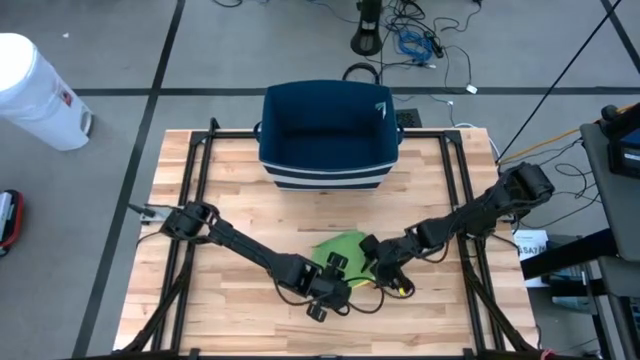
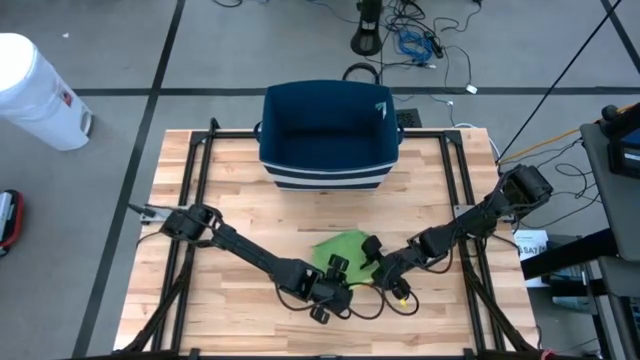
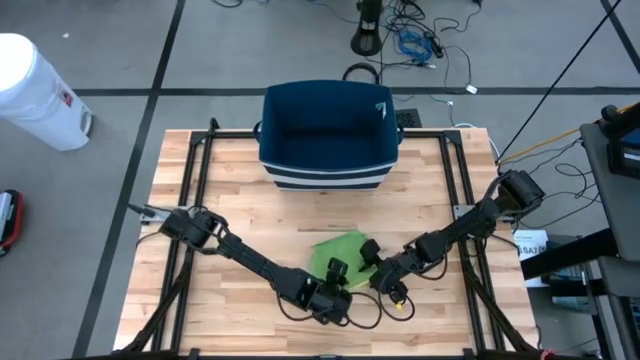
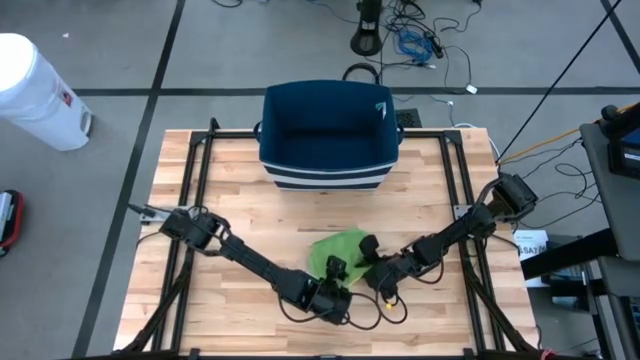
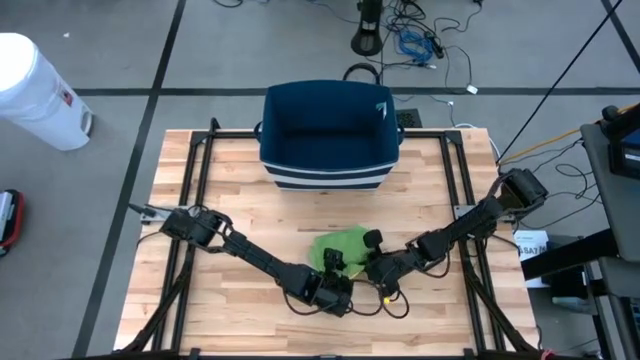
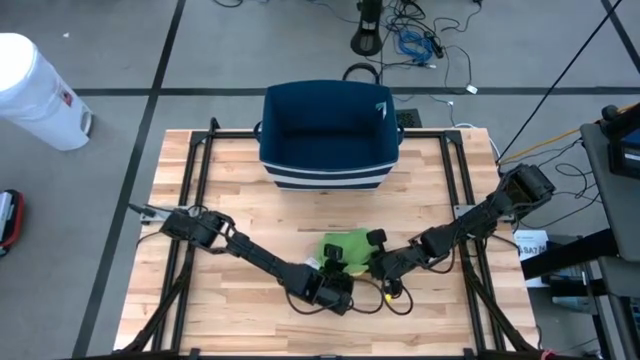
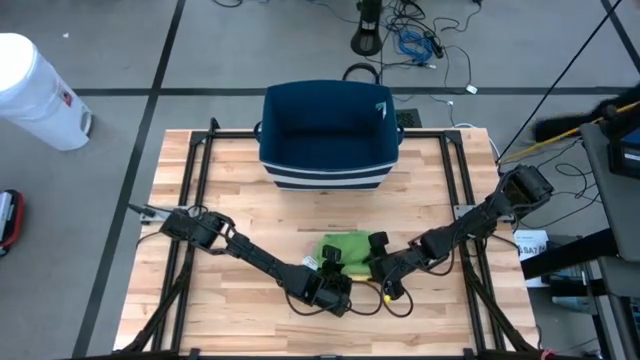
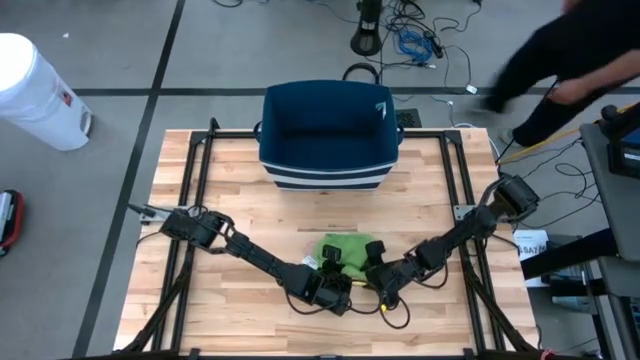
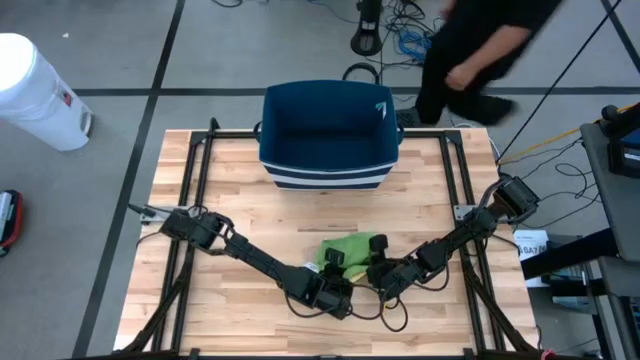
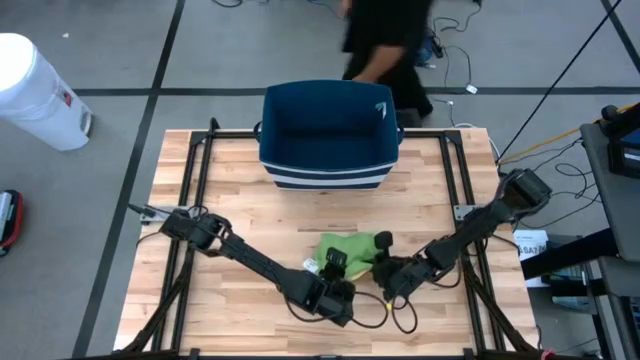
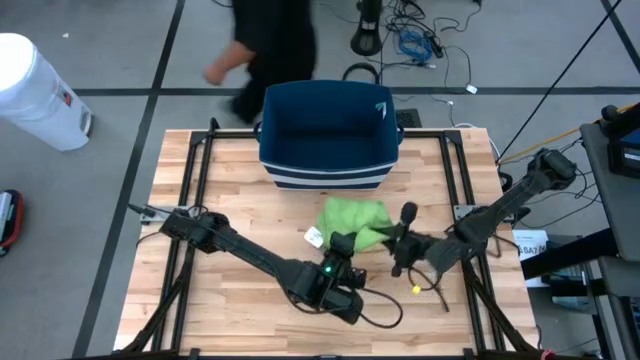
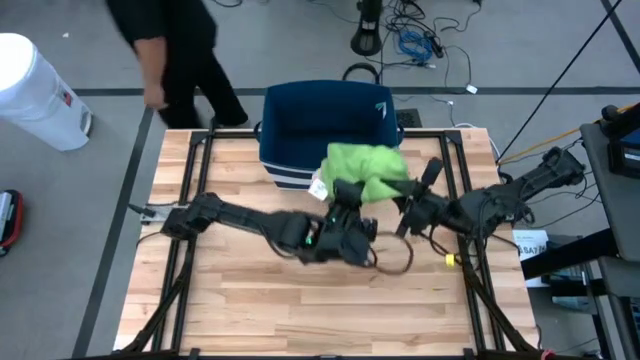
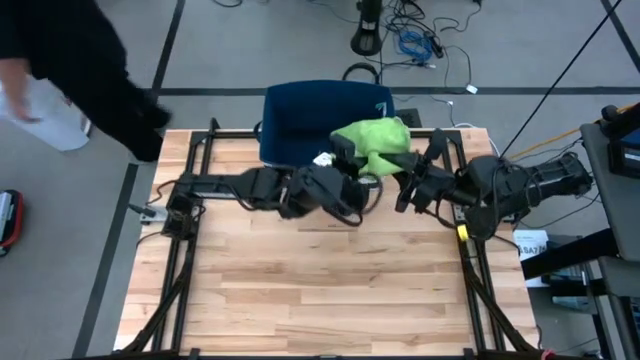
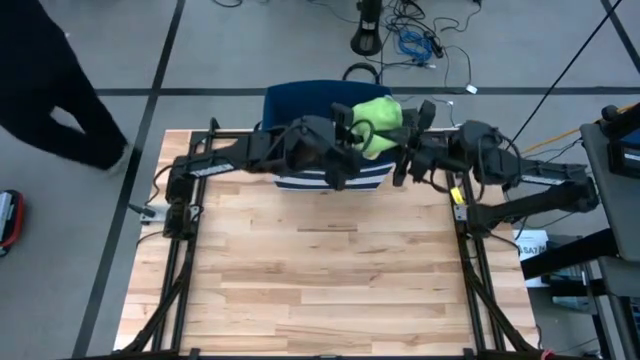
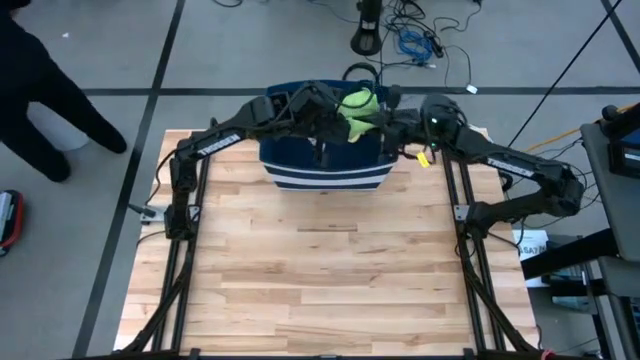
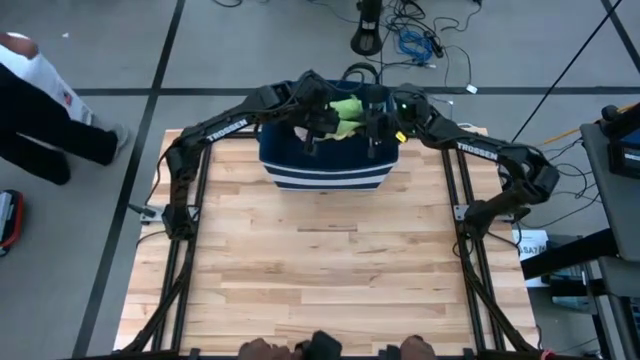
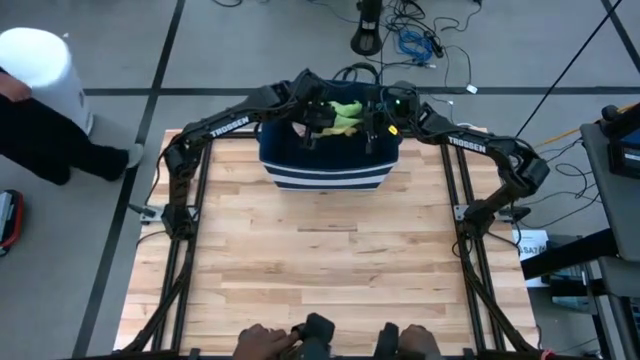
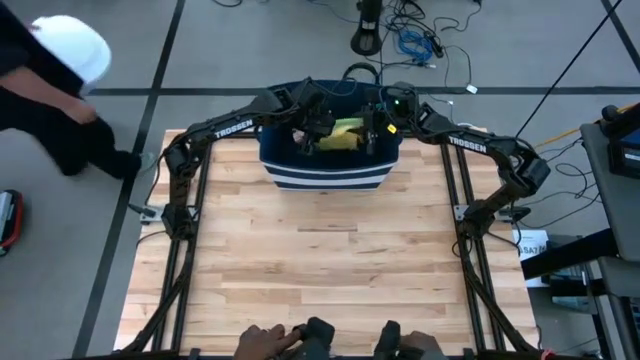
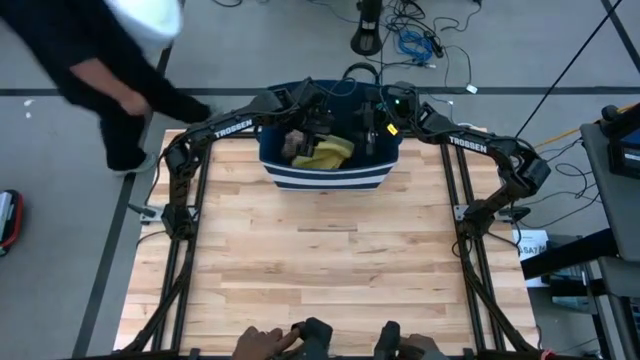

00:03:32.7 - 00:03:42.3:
Task: Fold towel
Put the stacked towels into the blue laundry bin

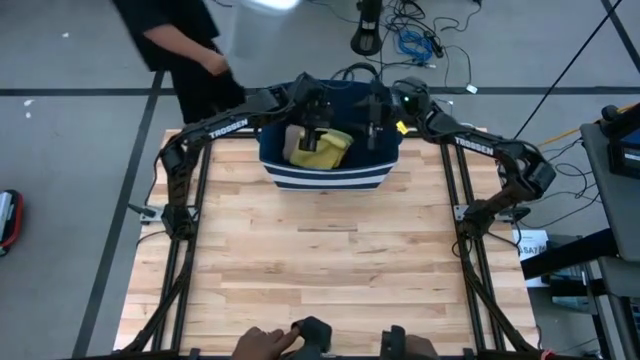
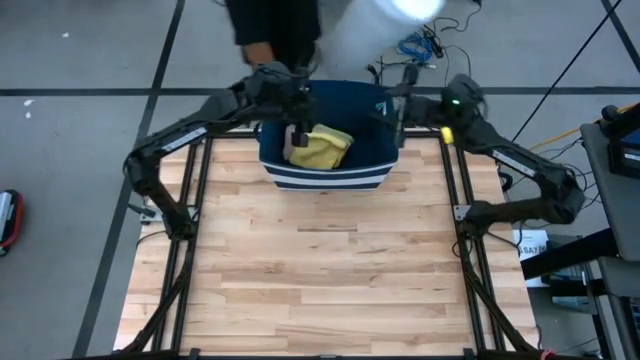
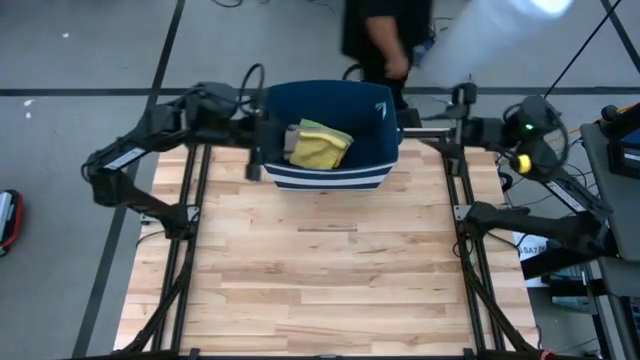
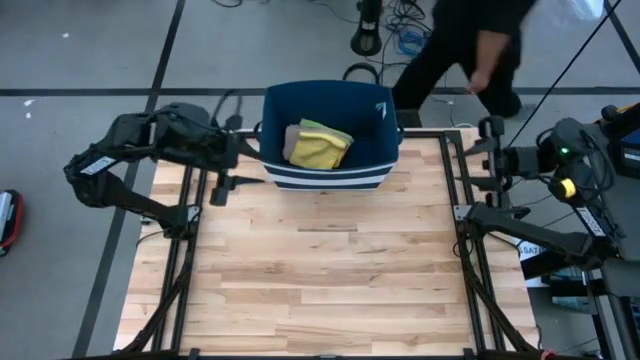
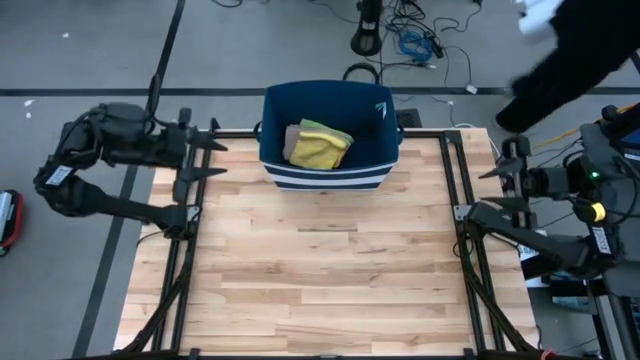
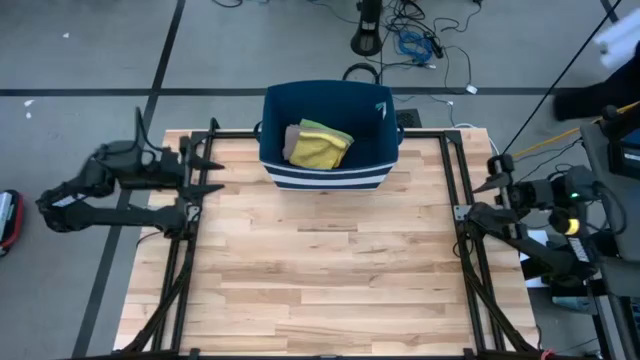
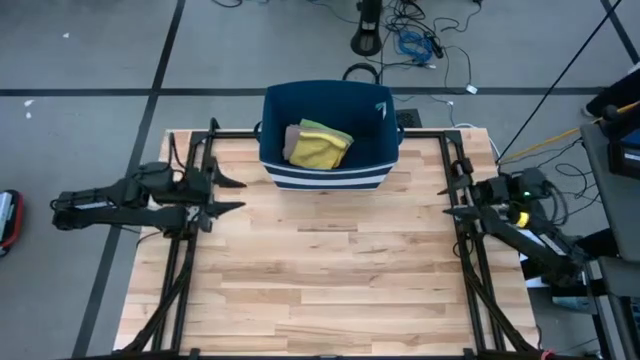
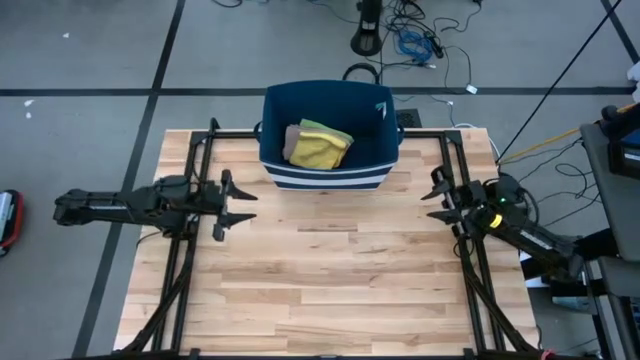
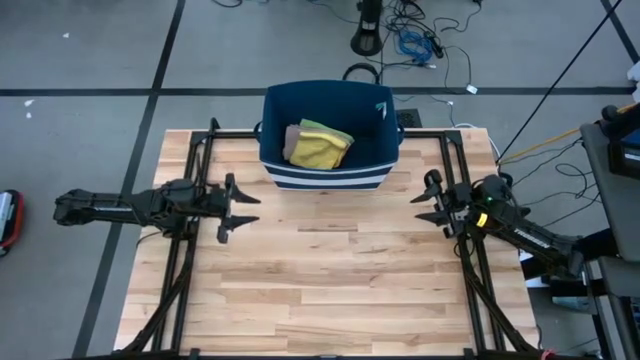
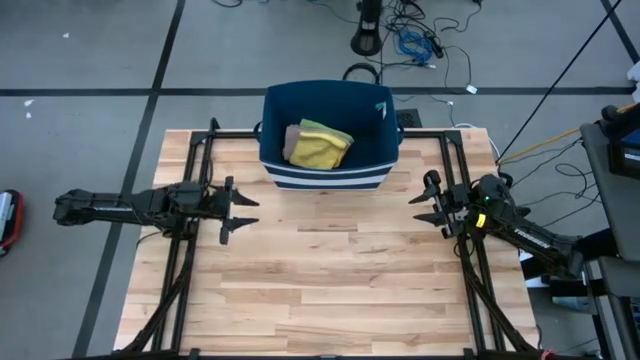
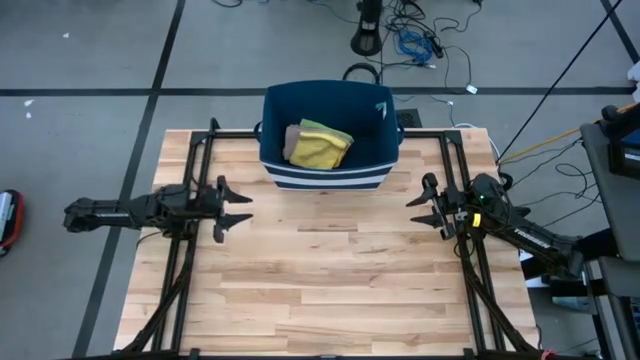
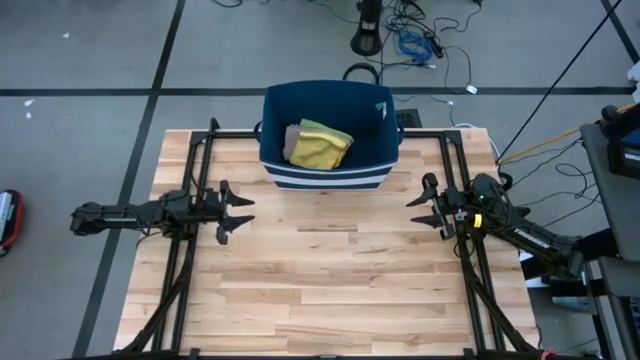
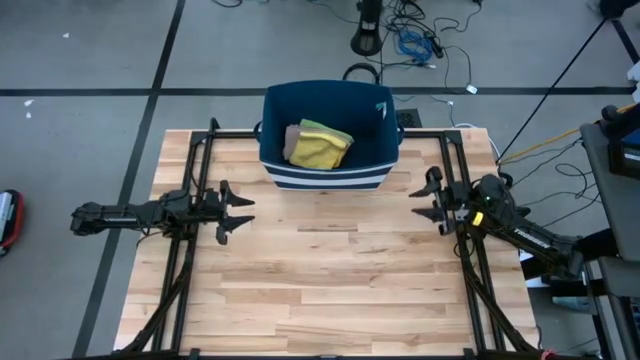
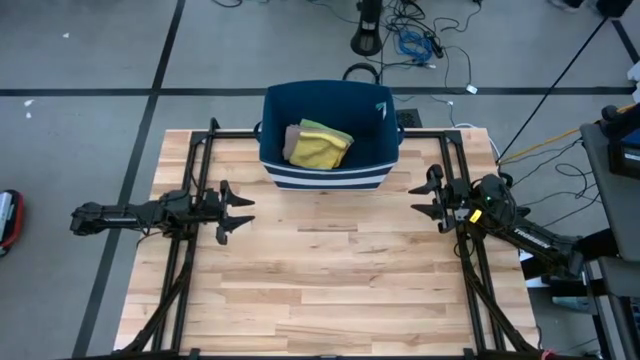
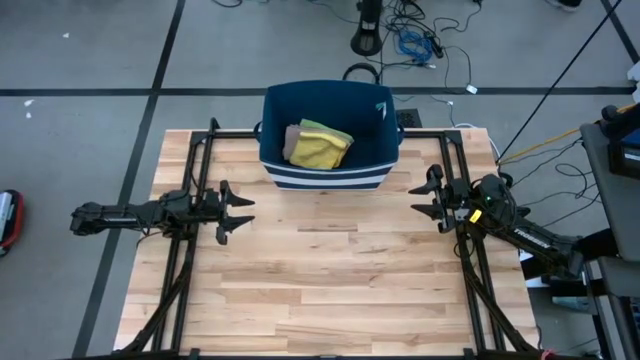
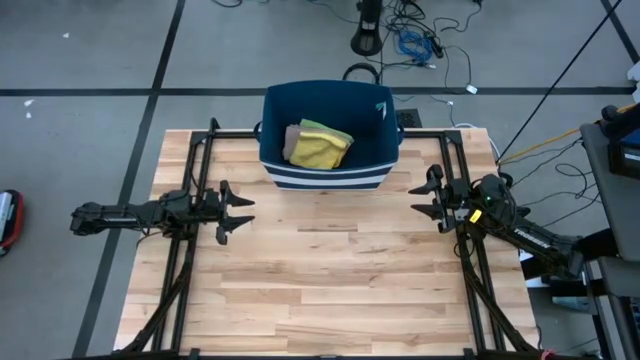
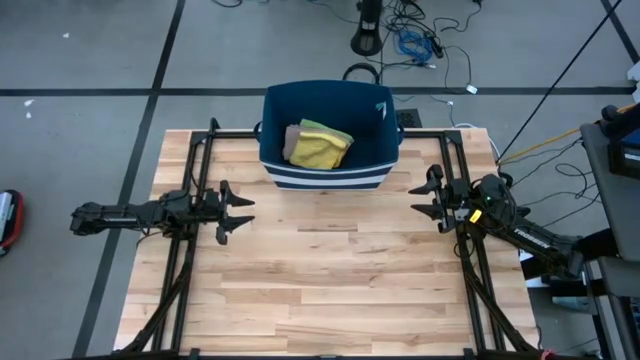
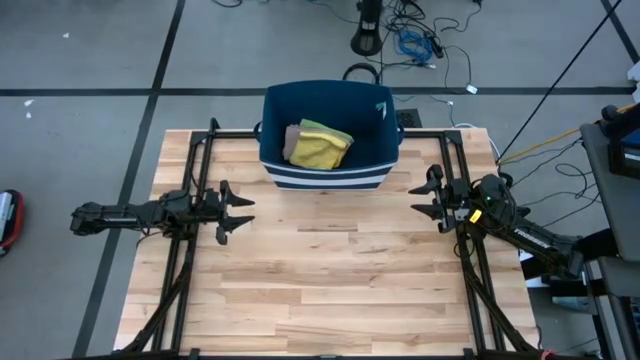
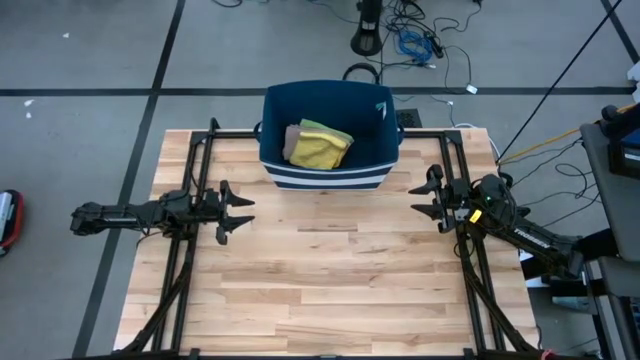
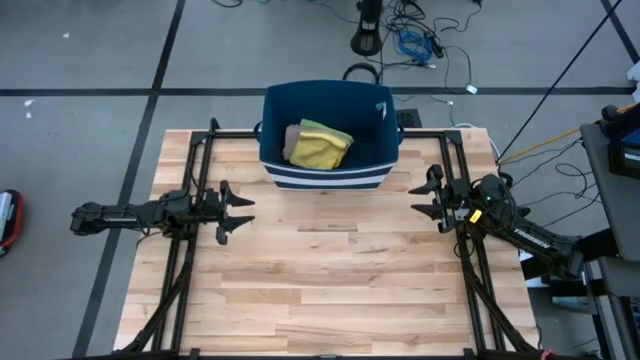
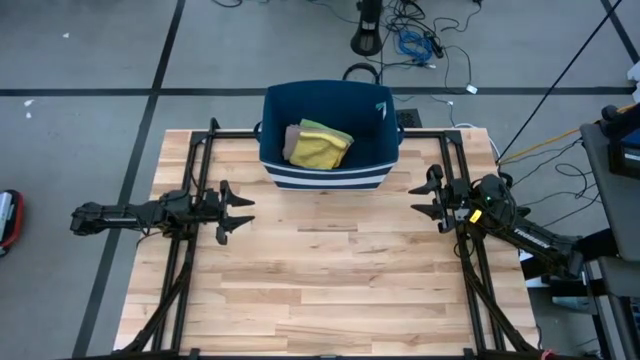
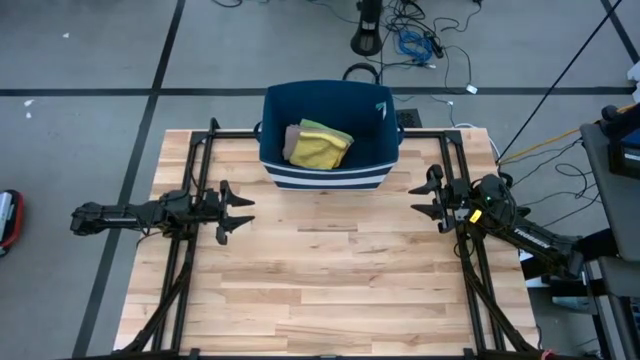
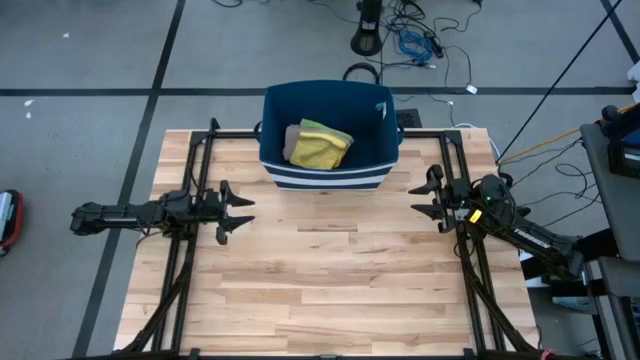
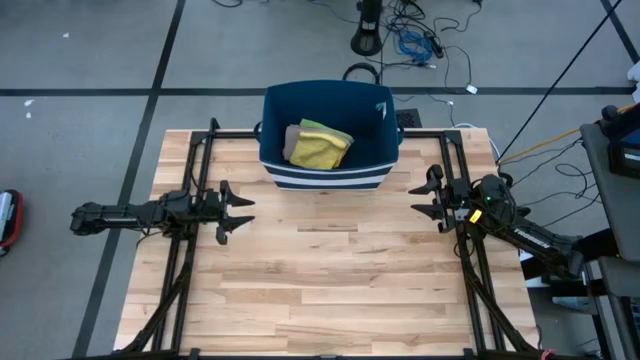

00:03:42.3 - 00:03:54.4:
Return to Home Position
